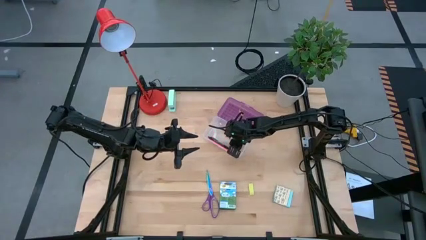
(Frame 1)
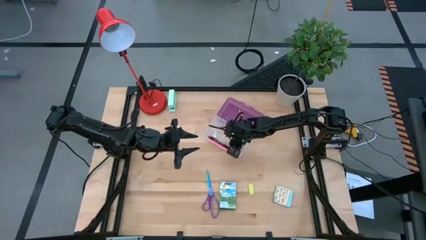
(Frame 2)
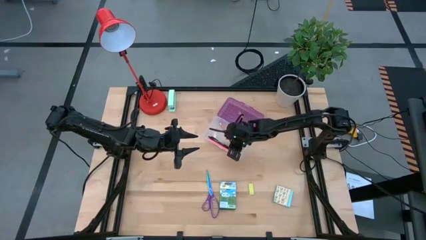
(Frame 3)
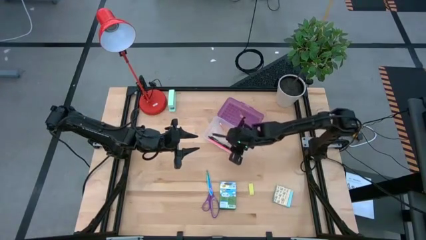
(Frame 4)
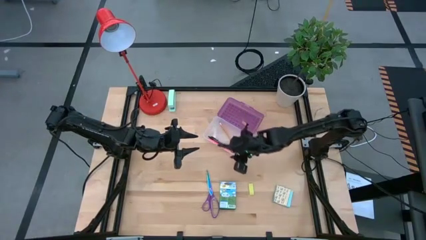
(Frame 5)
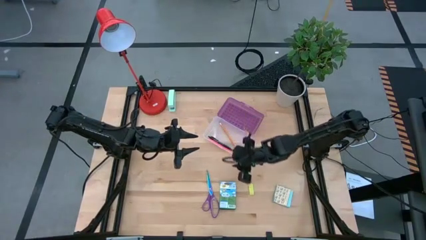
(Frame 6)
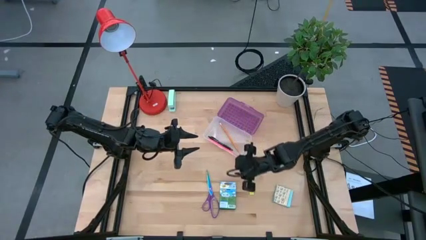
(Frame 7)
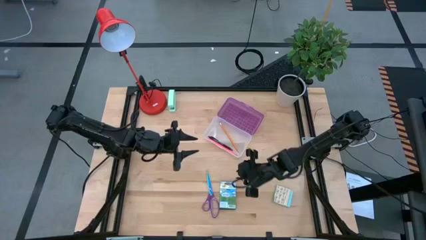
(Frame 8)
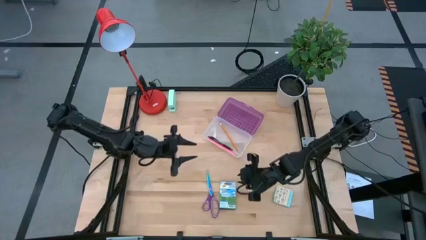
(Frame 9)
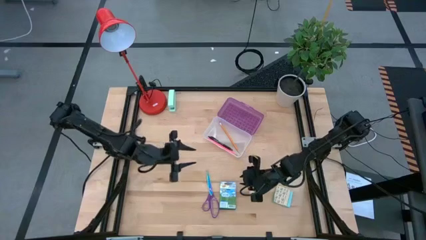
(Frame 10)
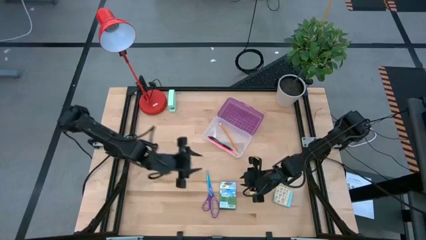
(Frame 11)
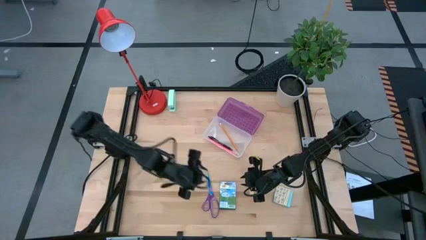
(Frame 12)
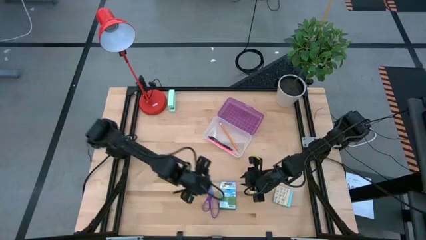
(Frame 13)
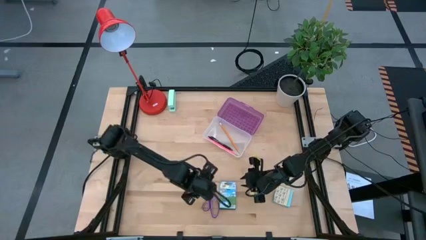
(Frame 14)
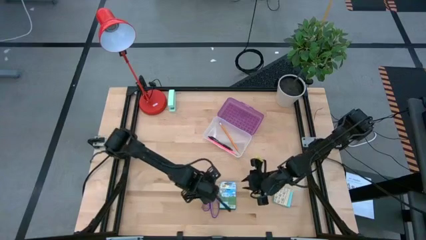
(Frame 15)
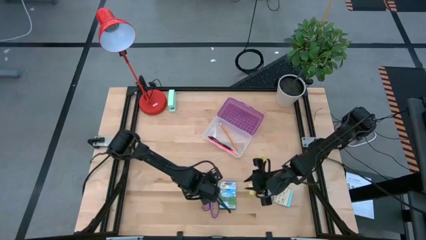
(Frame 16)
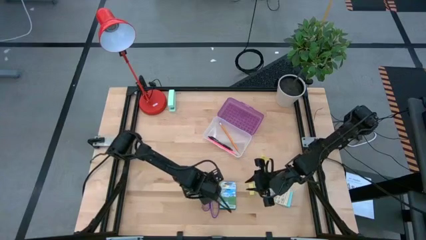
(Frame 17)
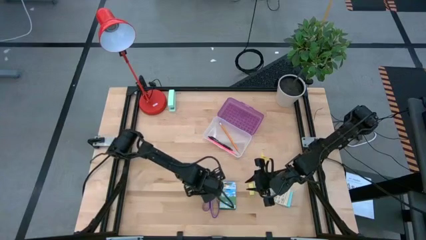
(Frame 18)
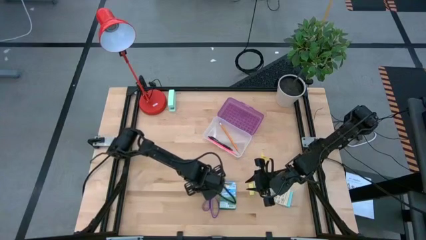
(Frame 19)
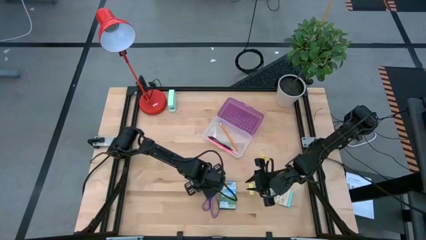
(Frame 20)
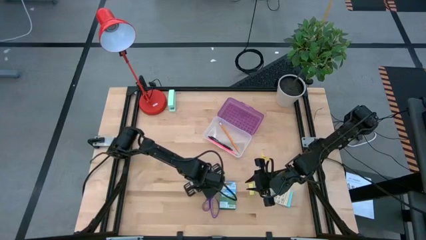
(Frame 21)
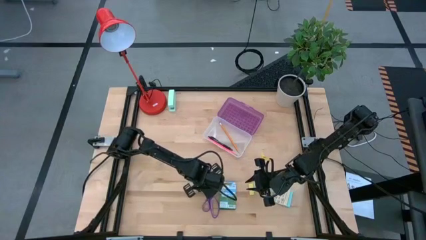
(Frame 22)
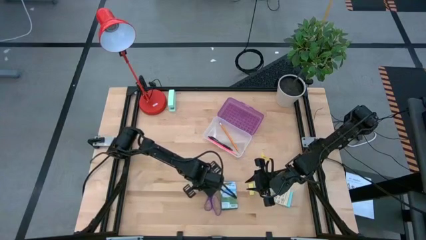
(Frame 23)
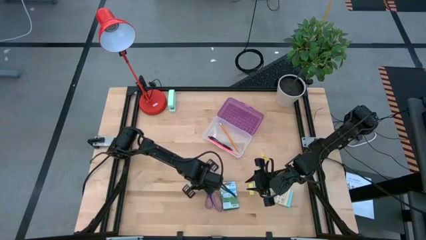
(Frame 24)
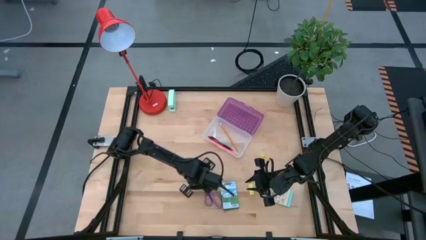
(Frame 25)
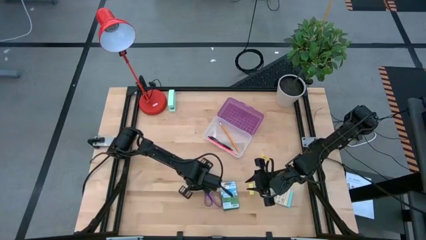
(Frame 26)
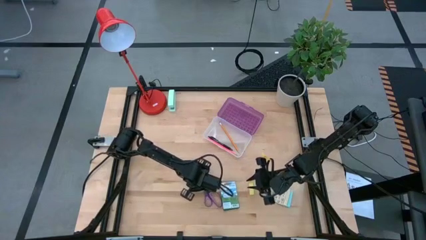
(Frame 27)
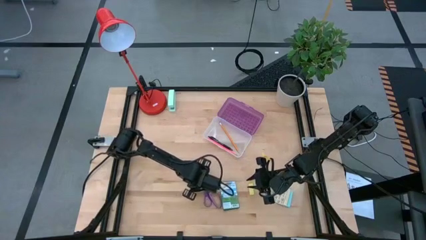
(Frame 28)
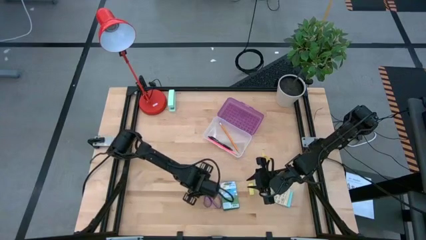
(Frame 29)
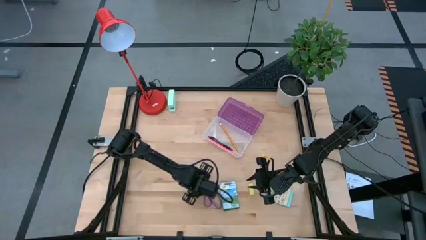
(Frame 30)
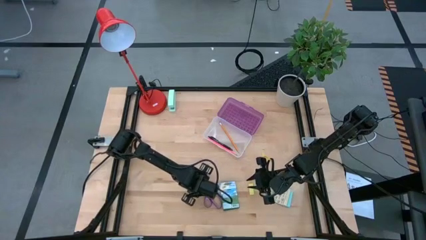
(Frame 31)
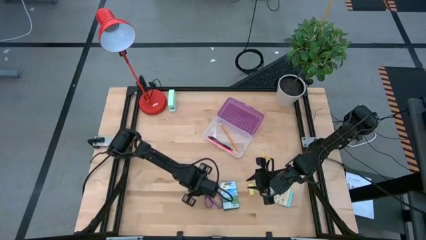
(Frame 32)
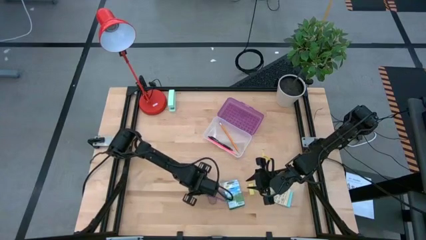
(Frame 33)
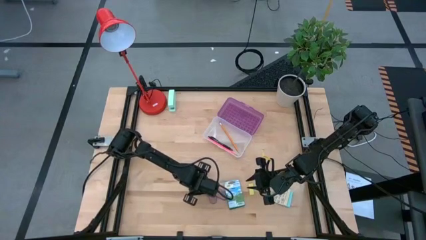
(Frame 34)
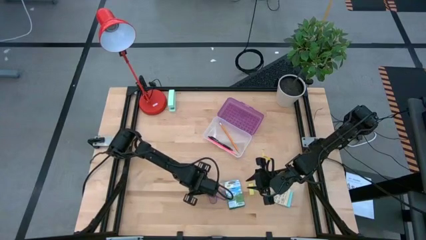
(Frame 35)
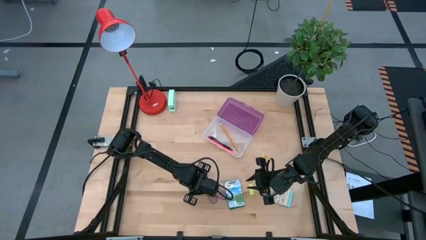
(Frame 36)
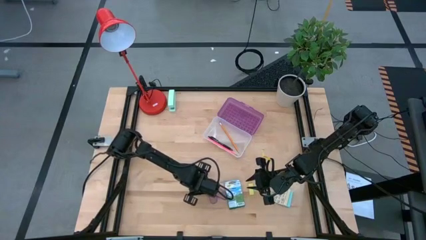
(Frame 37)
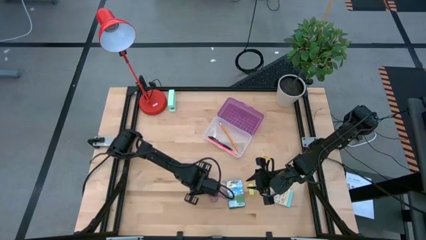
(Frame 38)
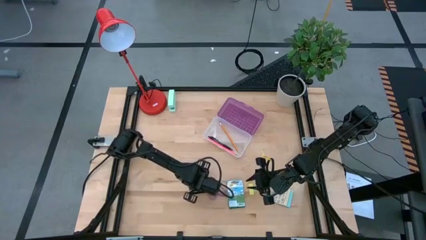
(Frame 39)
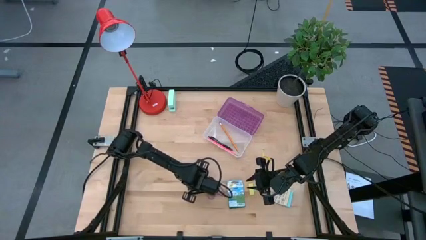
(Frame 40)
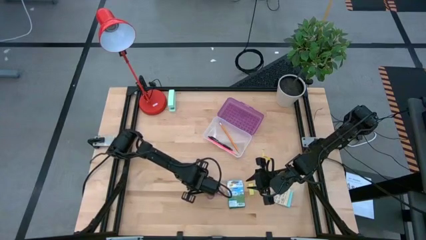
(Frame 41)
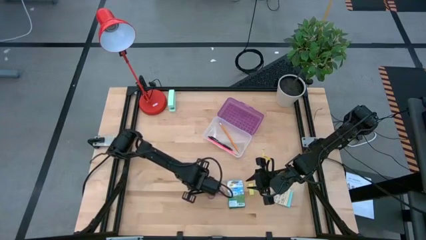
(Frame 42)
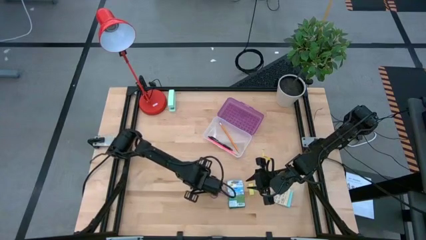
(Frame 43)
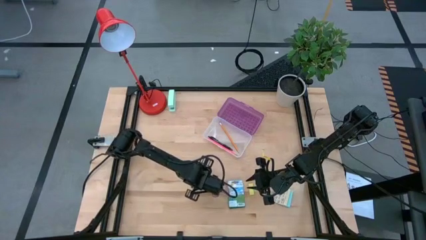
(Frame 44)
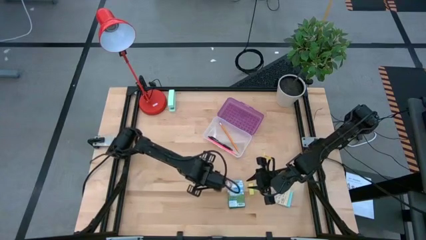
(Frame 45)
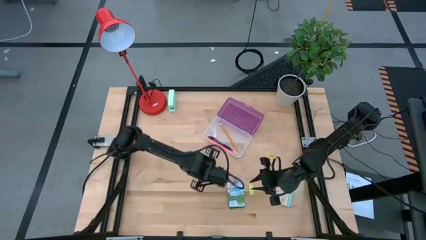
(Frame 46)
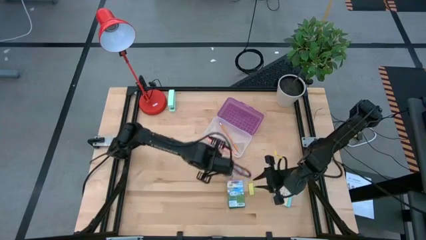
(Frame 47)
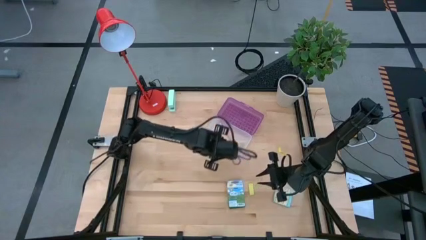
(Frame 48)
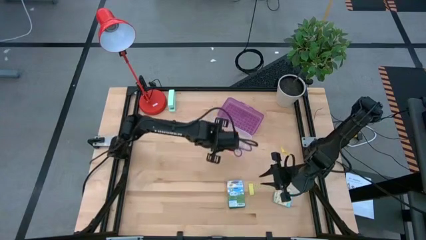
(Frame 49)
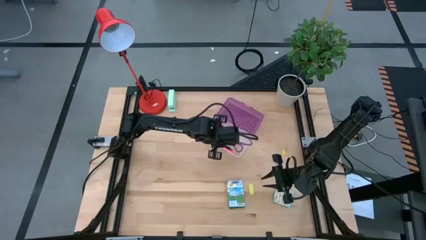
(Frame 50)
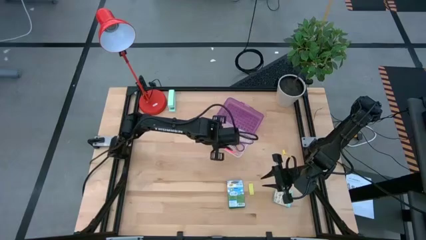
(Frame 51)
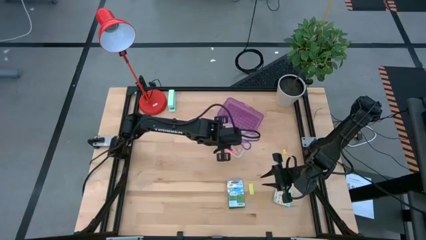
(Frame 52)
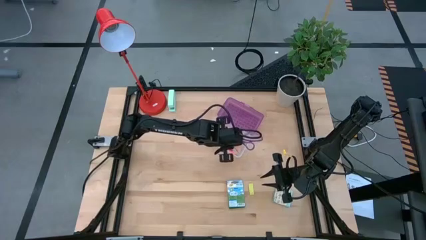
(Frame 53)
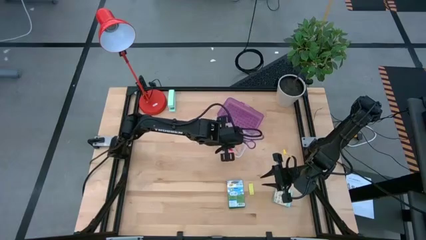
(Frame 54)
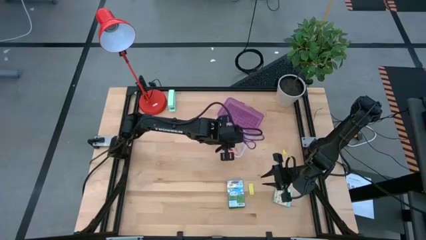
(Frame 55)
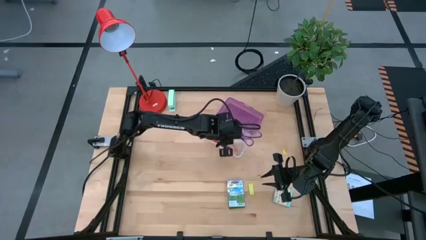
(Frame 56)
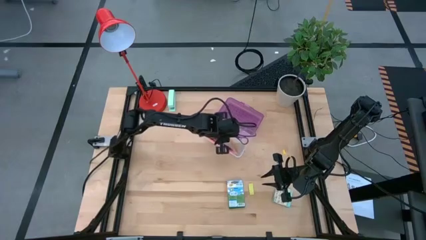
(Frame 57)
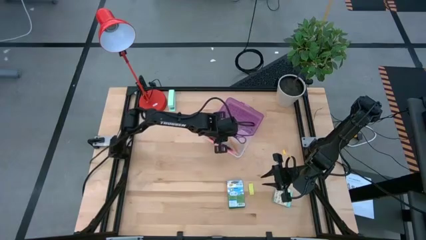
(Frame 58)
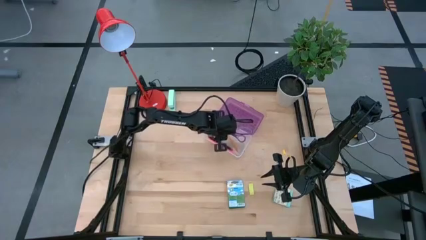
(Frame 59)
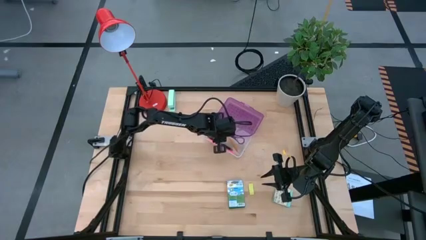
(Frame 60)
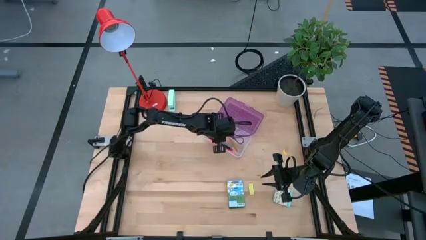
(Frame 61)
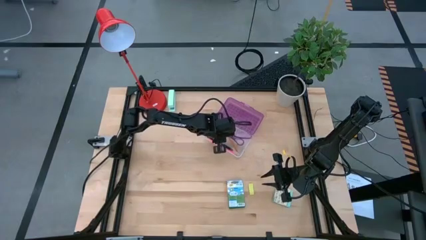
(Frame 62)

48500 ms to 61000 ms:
Task: Pack school essentials
Put the purple scissors into the purple supply box
